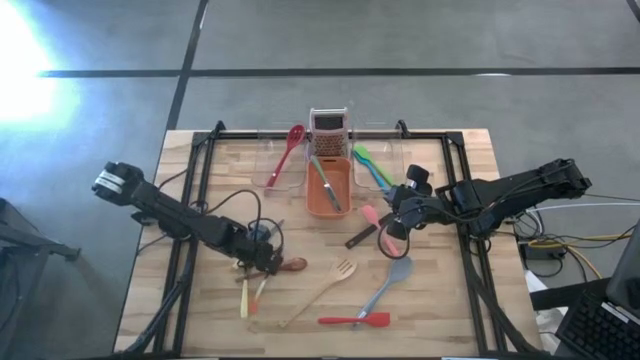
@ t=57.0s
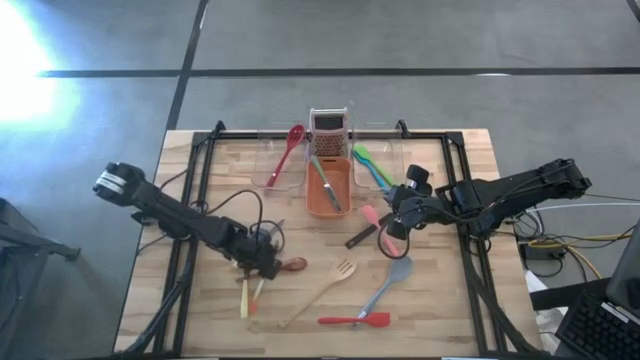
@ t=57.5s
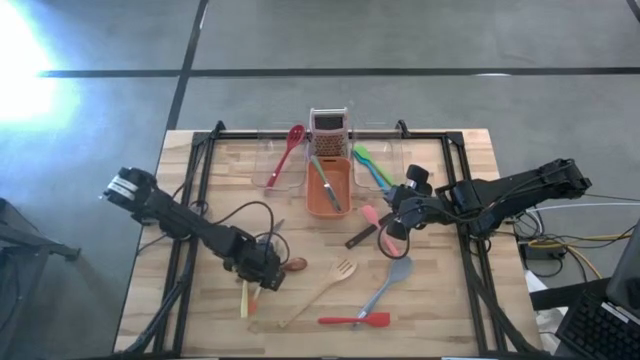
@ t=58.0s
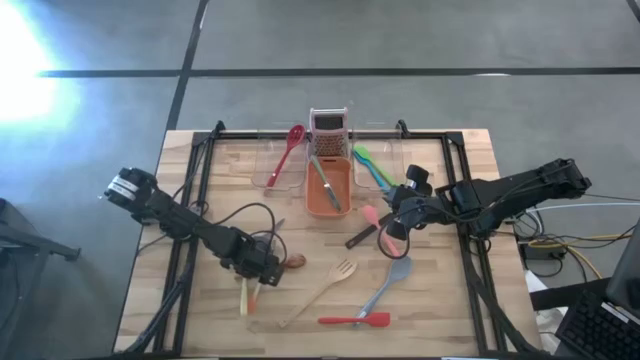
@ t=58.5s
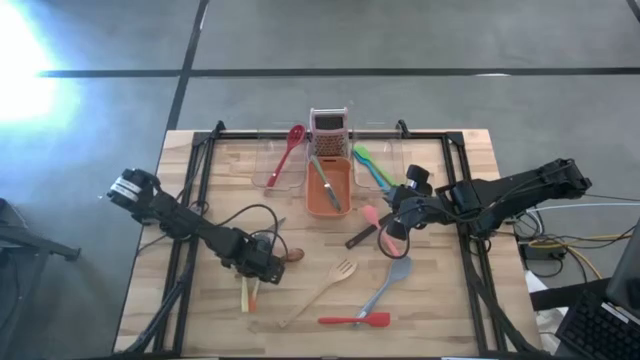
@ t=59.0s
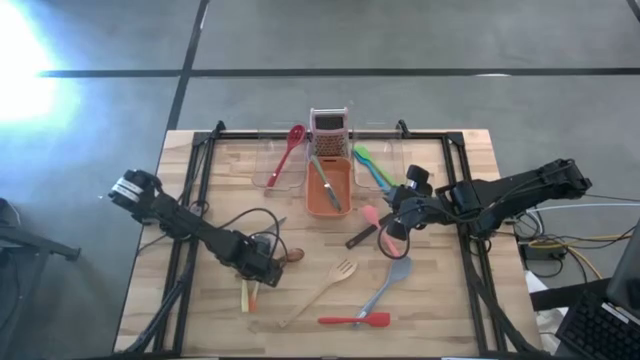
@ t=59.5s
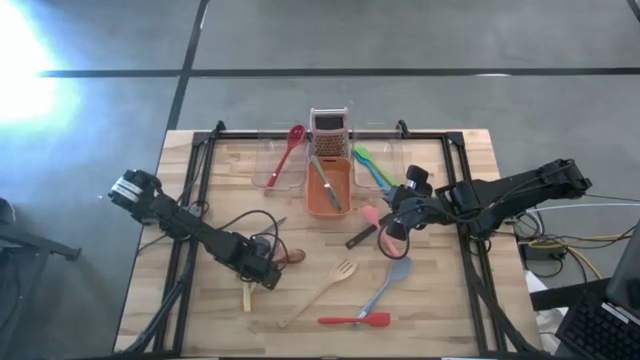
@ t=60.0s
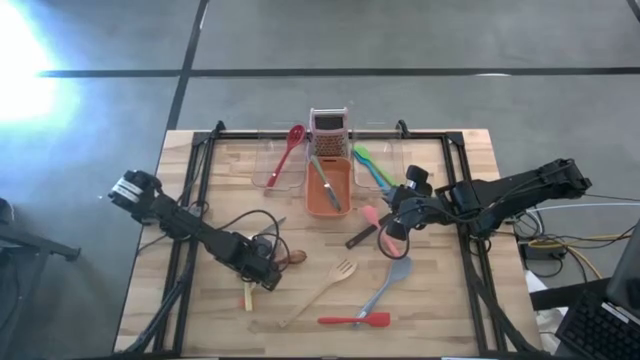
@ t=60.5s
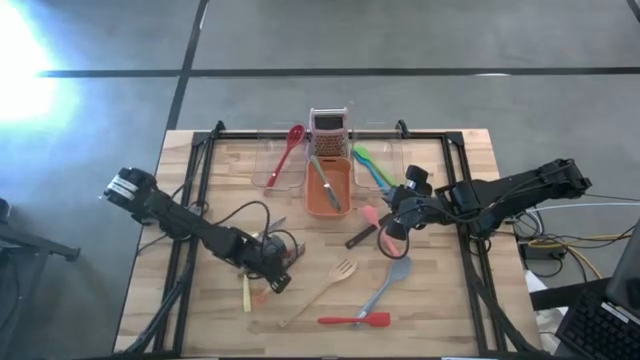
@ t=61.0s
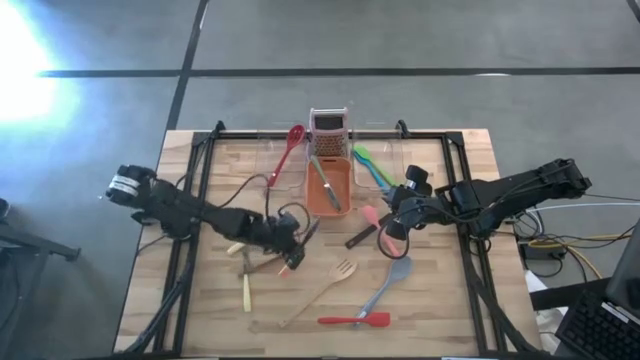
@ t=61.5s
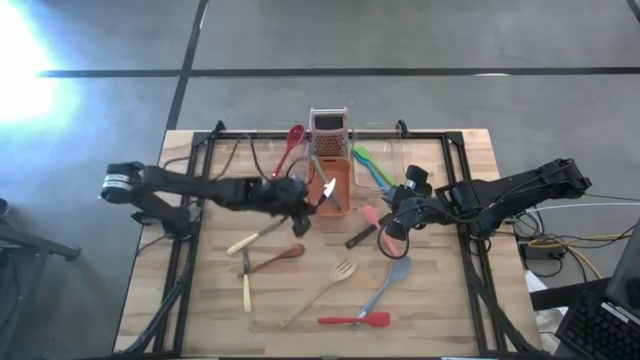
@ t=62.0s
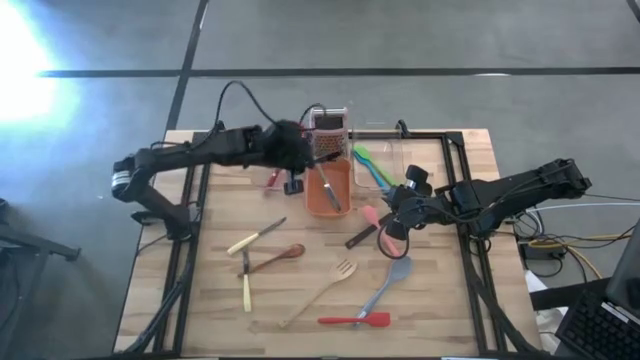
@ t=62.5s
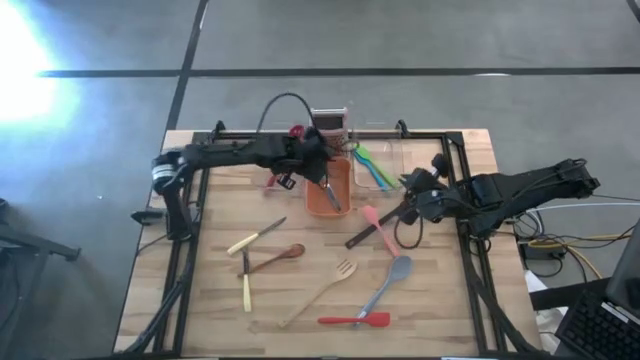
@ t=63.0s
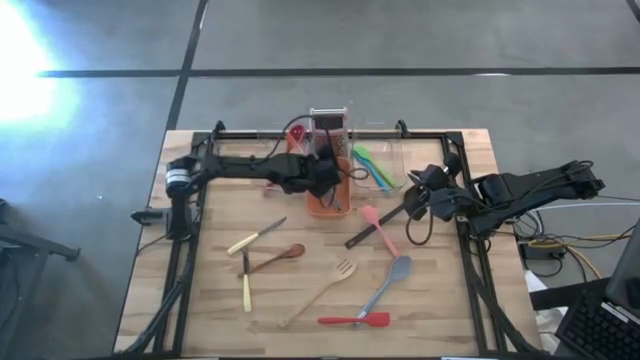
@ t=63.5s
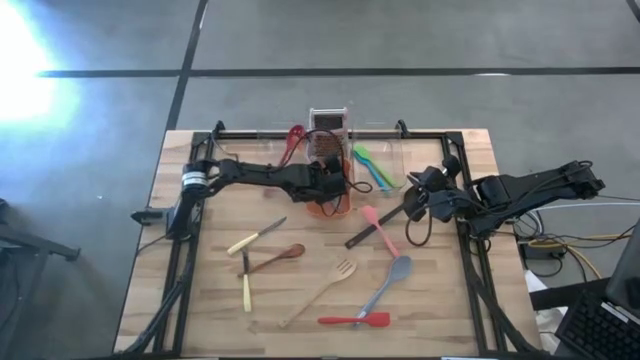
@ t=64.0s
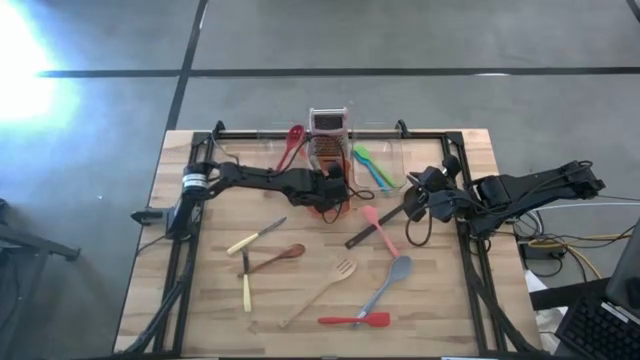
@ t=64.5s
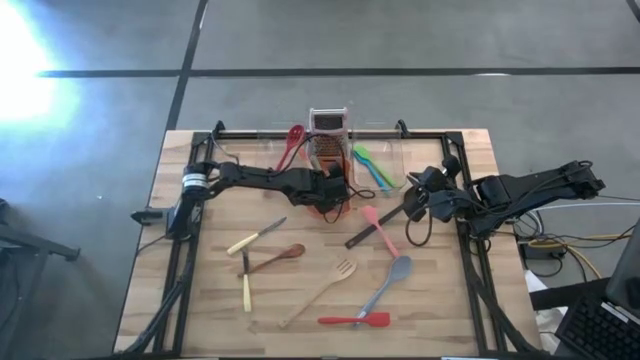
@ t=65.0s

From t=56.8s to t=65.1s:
Task: Pick & Place Kitchen Items
Put the orange table knife into the orange bin

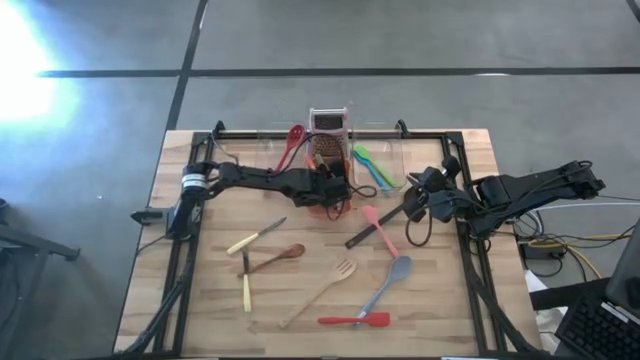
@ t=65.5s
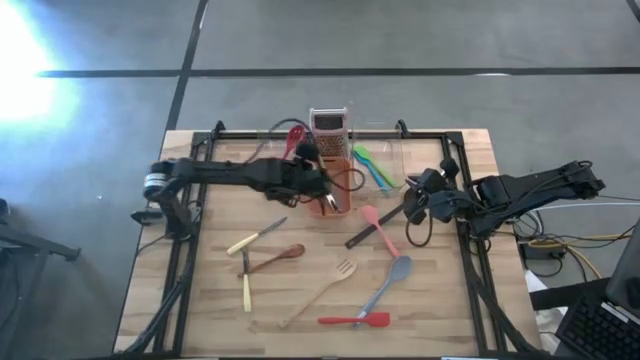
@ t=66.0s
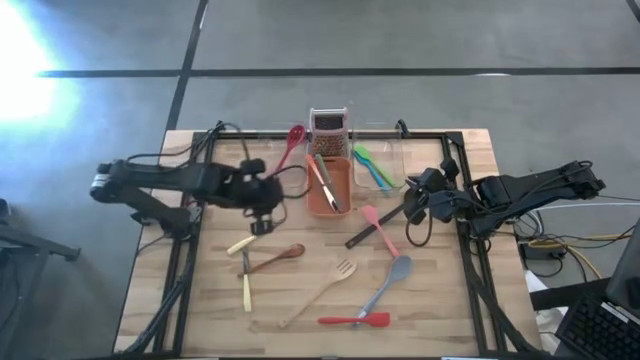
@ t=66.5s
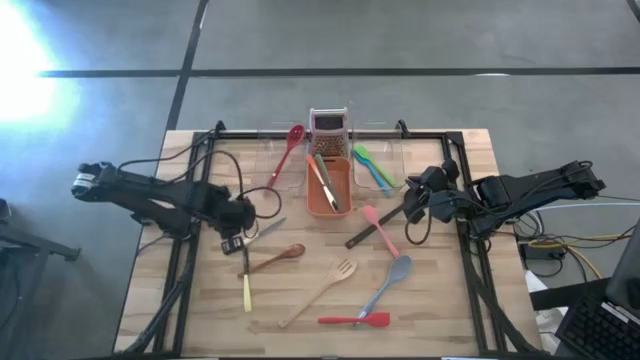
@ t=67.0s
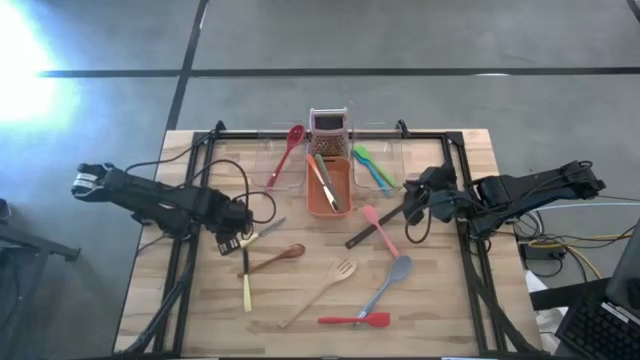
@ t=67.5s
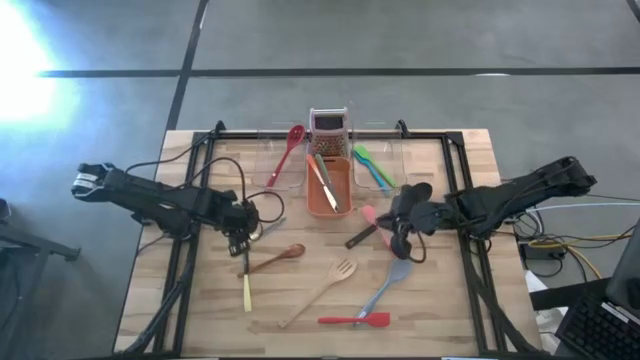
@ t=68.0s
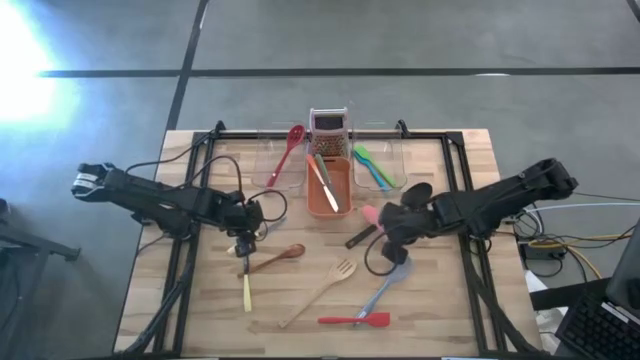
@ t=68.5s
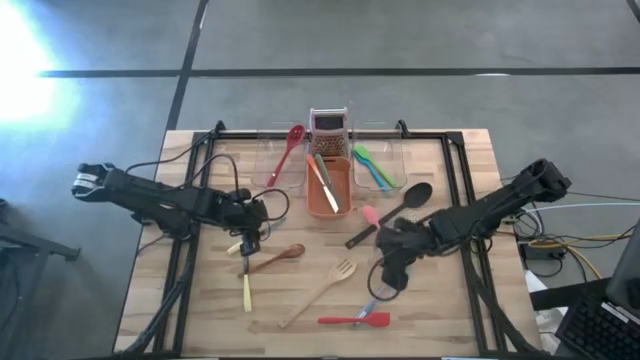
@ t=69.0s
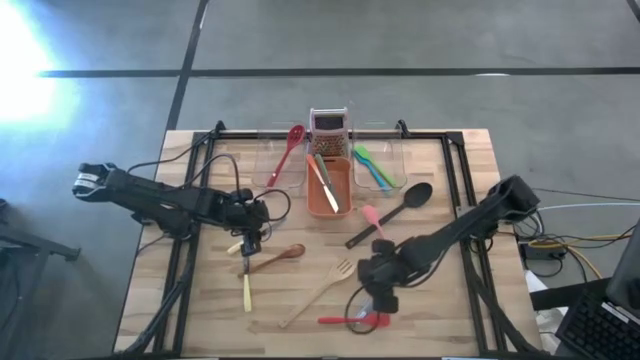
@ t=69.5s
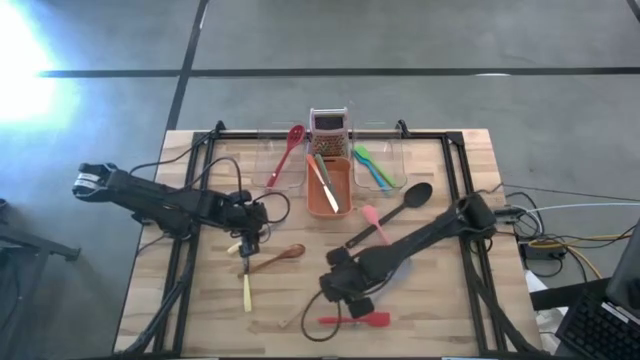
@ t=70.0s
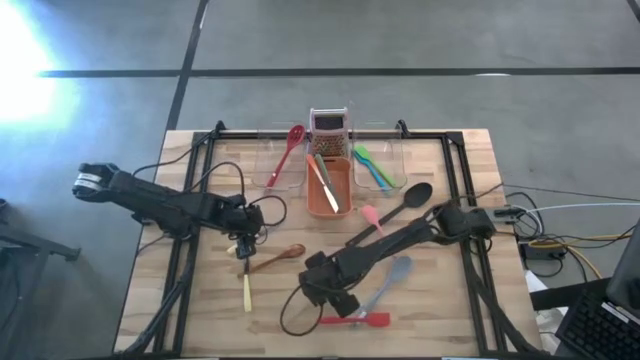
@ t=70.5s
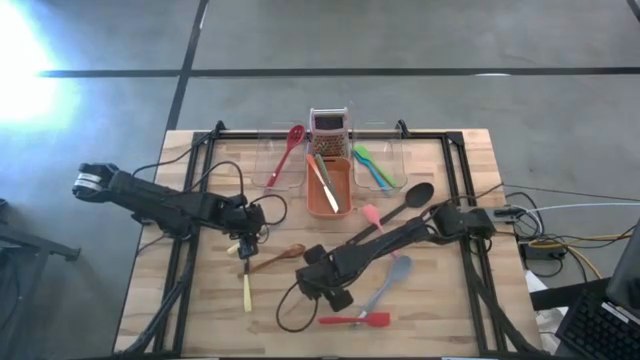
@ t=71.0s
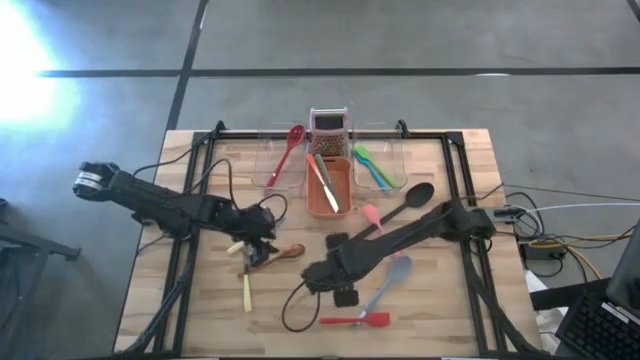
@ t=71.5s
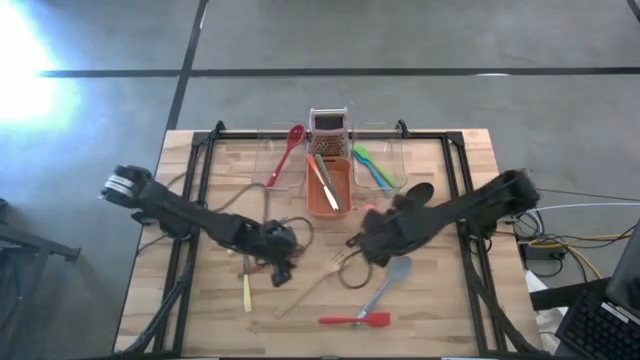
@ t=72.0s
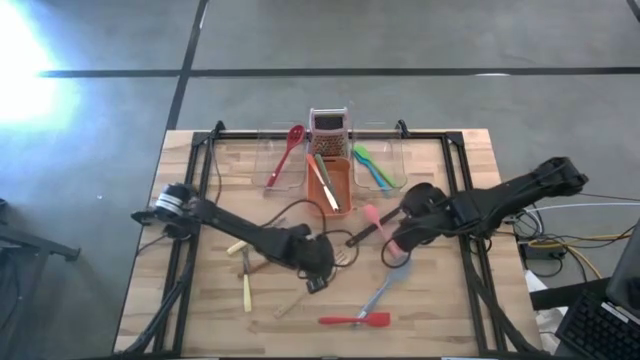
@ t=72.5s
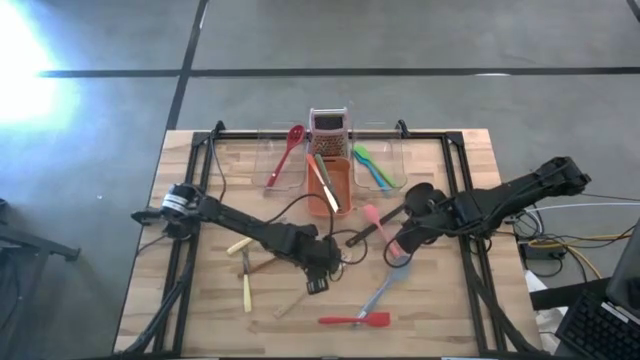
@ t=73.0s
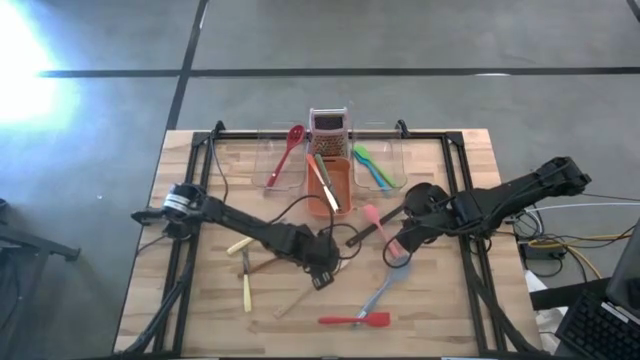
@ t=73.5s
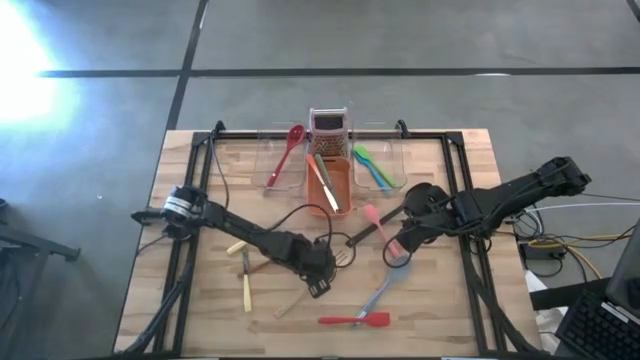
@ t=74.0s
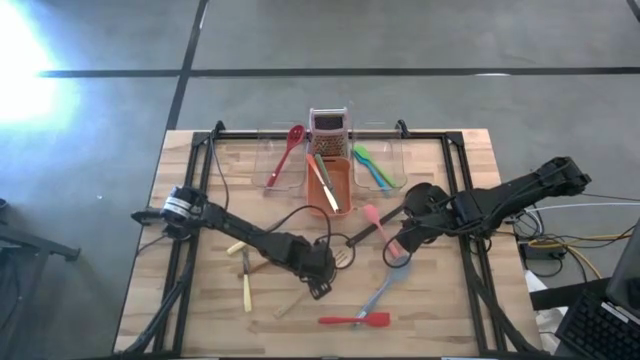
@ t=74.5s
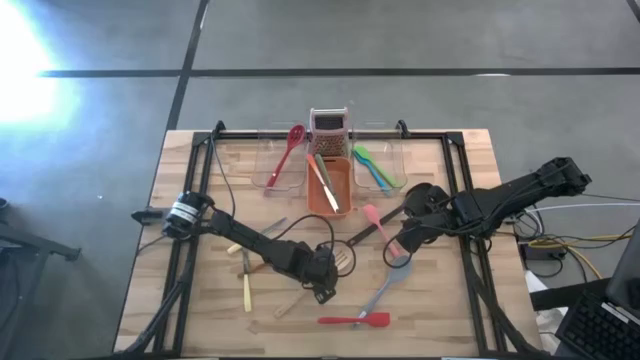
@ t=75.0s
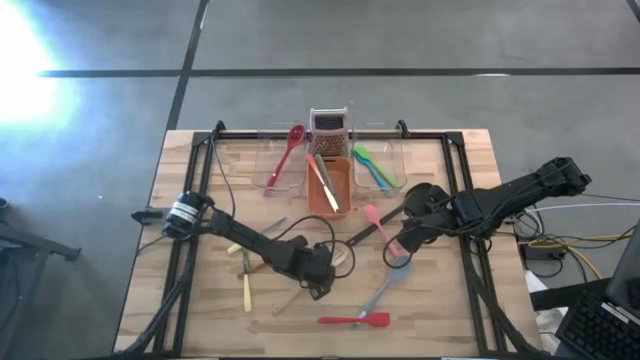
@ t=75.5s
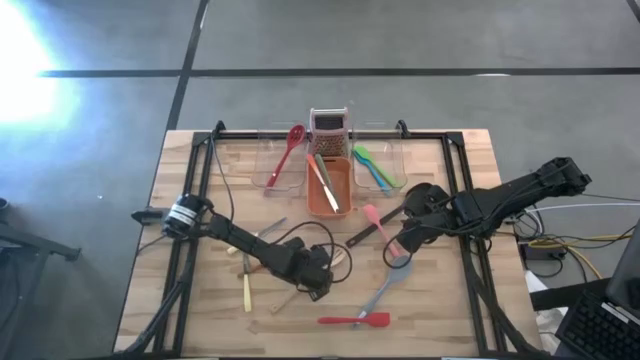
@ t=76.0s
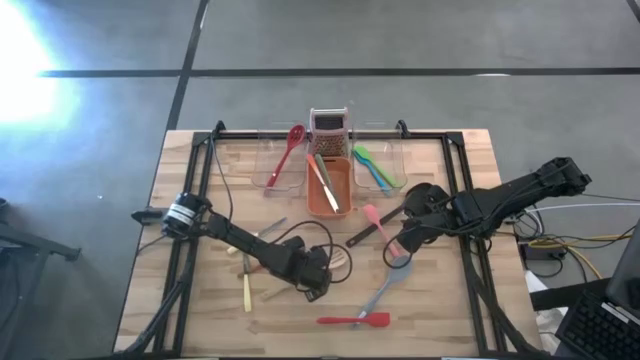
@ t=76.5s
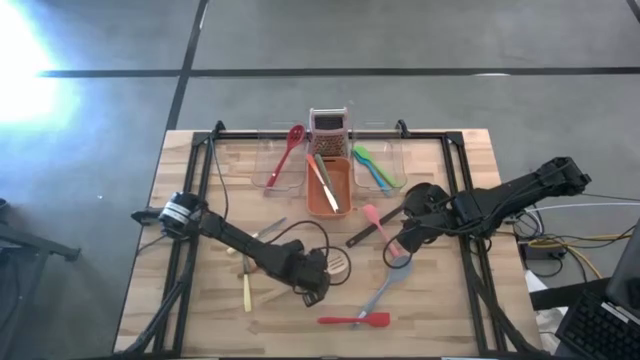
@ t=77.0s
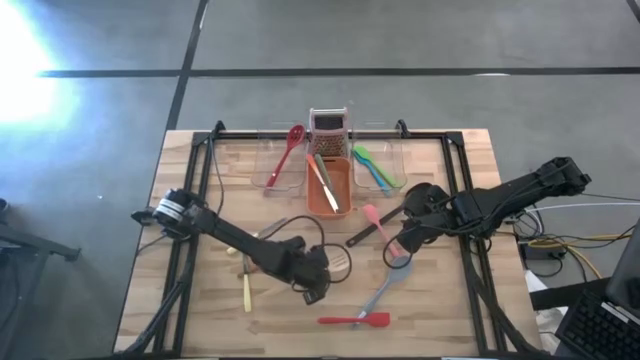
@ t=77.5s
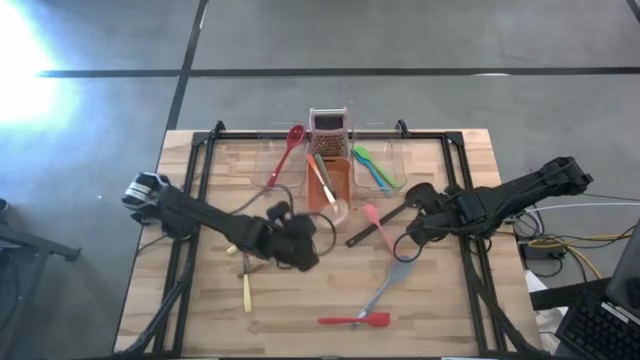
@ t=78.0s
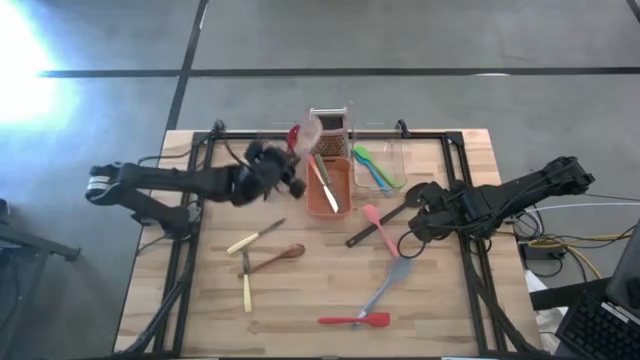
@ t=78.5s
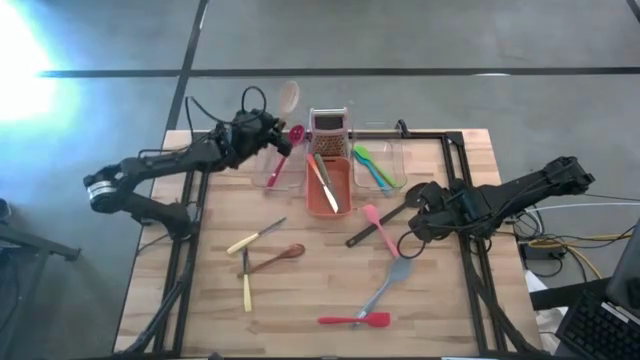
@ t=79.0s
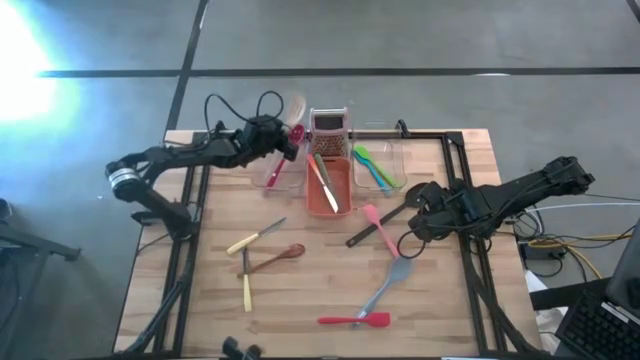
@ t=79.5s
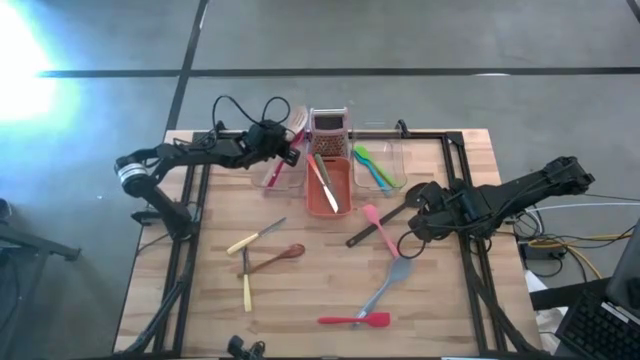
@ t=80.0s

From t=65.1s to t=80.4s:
Put the brown slotted serving spoon into the left transparent bin
